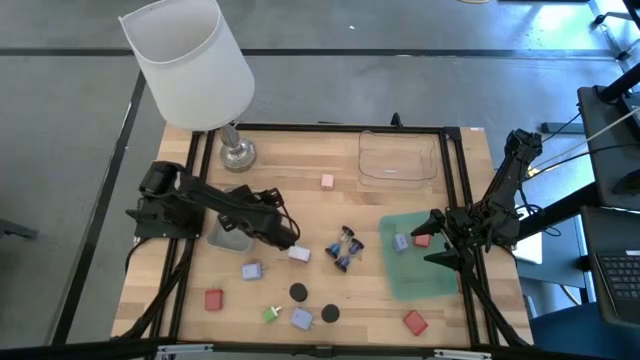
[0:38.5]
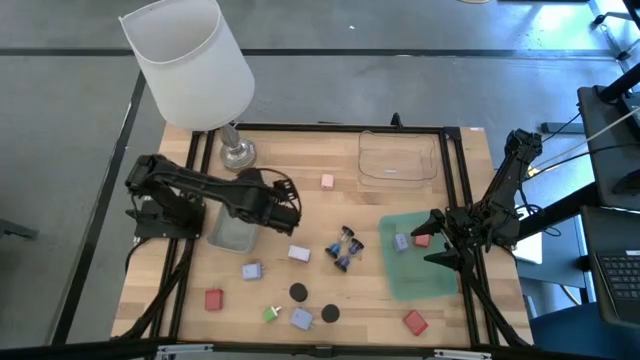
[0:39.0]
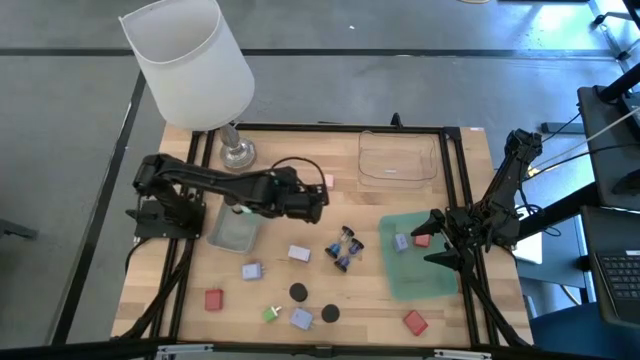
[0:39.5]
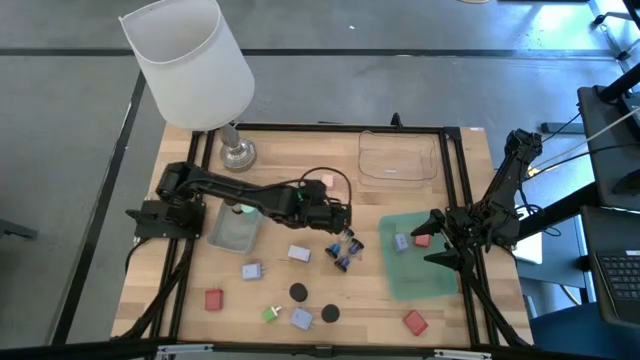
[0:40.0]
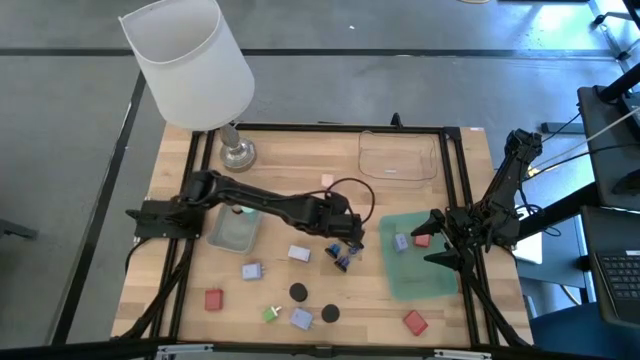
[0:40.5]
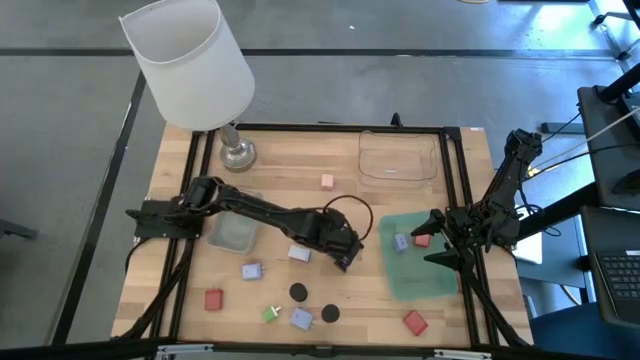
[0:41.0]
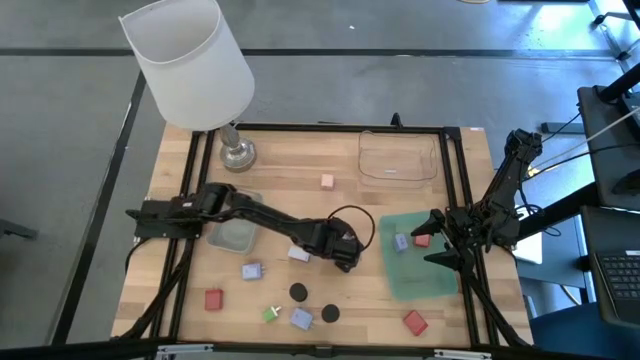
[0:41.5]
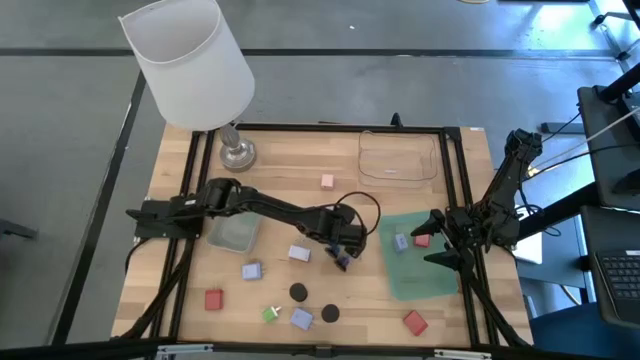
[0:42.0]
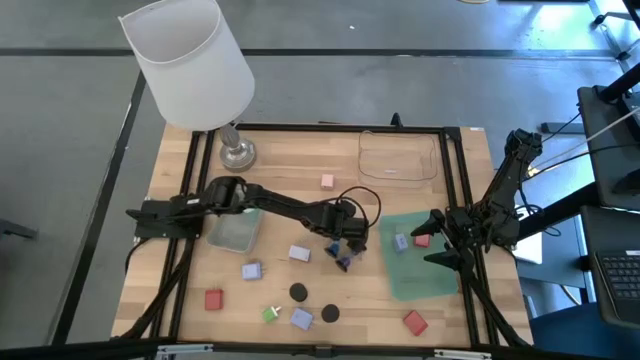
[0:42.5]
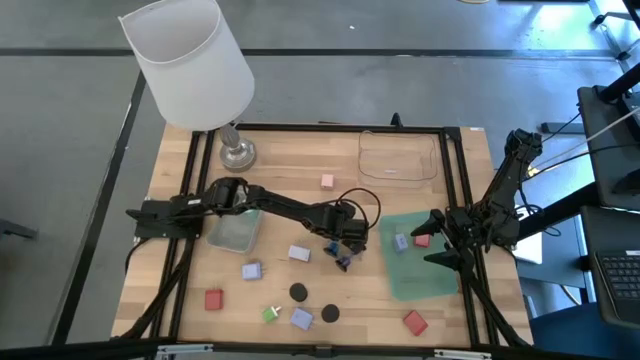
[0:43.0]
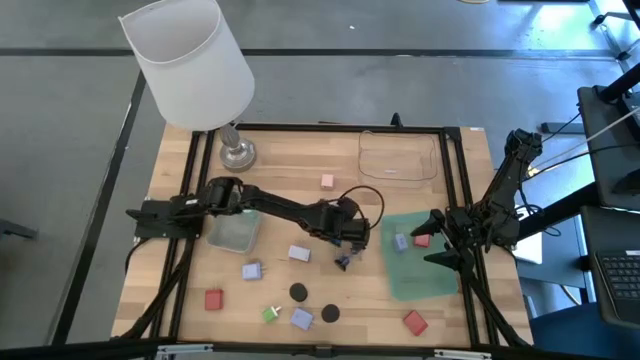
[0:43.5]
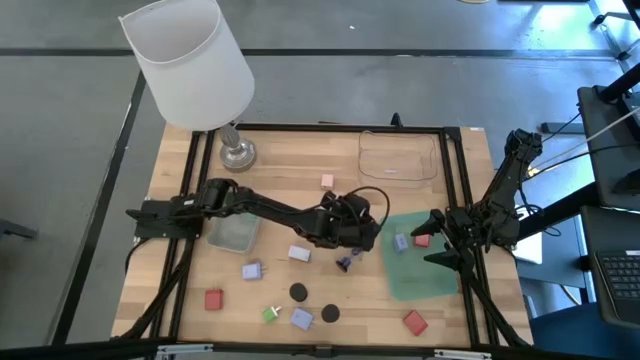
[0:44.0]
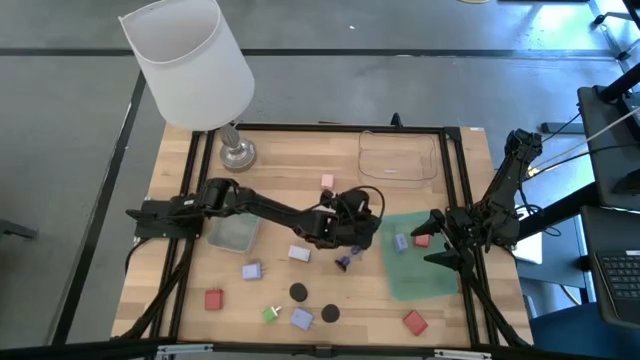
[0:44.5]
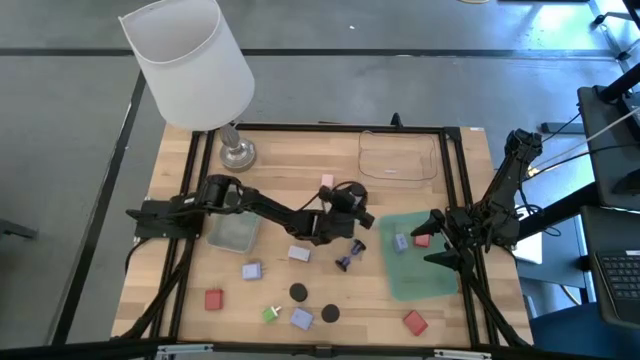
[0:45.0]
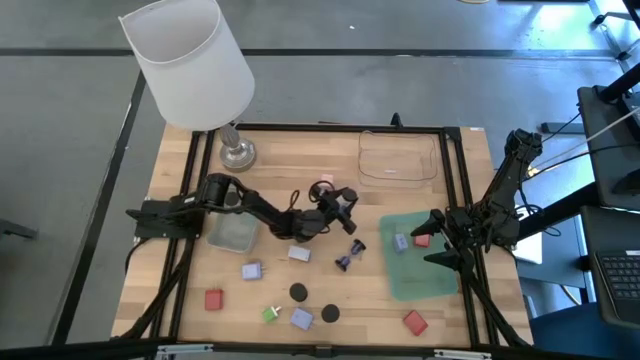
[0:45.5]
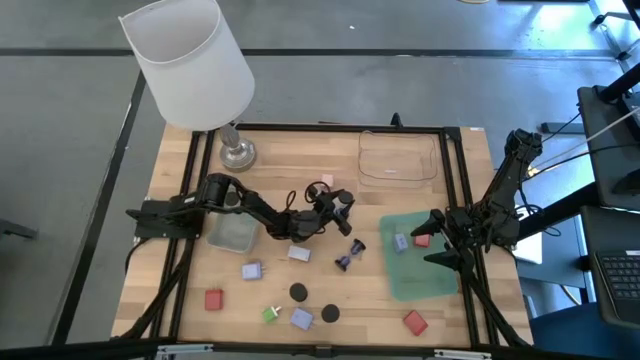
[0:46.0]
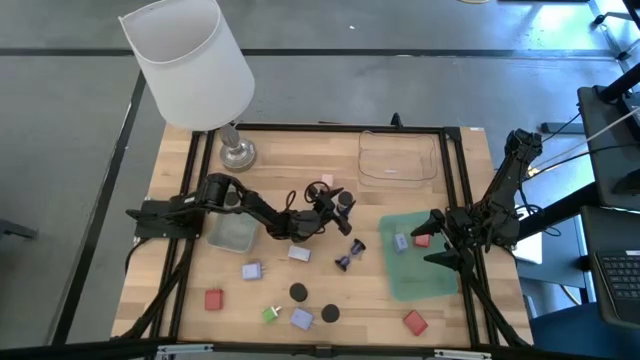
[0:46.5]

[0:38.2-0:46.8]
Task: Pick & Place Office items
Adjust the top blue hourglass

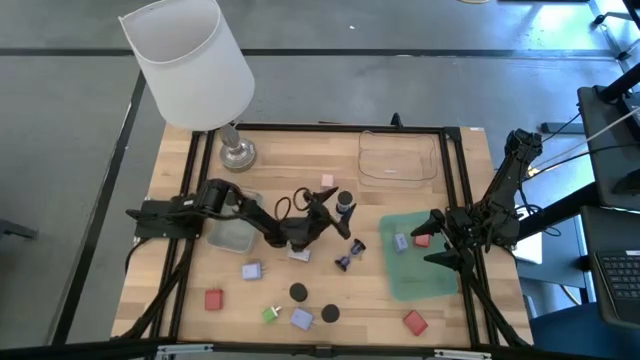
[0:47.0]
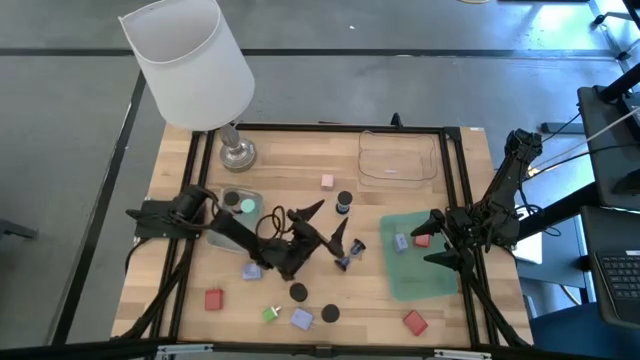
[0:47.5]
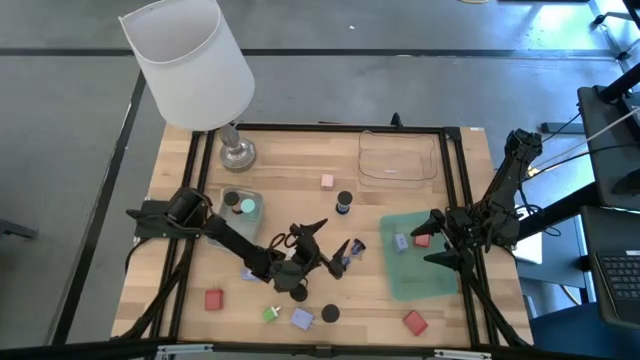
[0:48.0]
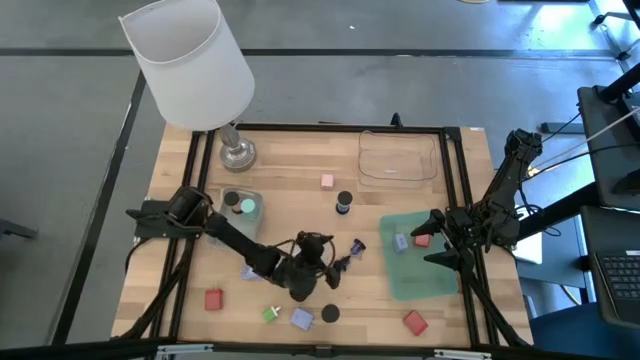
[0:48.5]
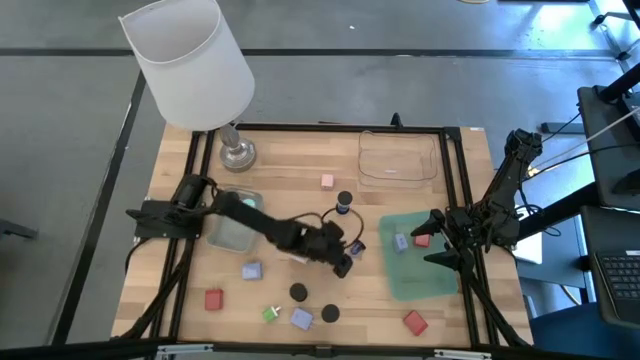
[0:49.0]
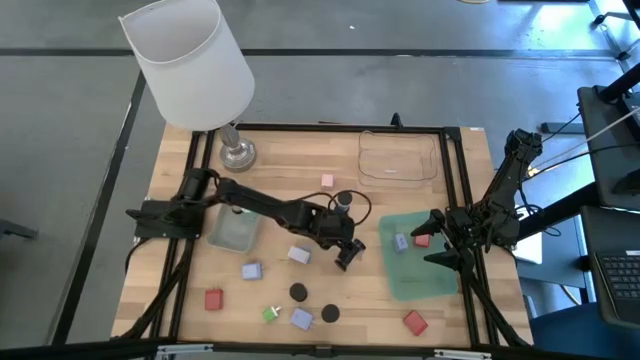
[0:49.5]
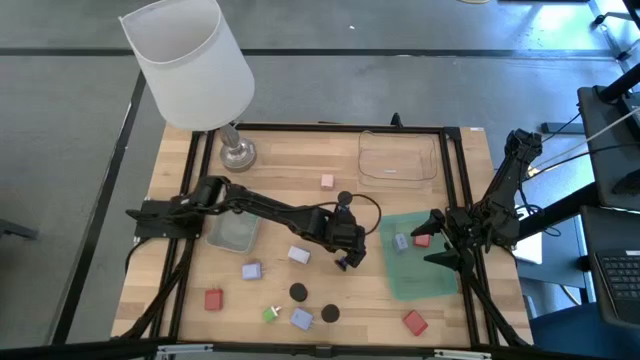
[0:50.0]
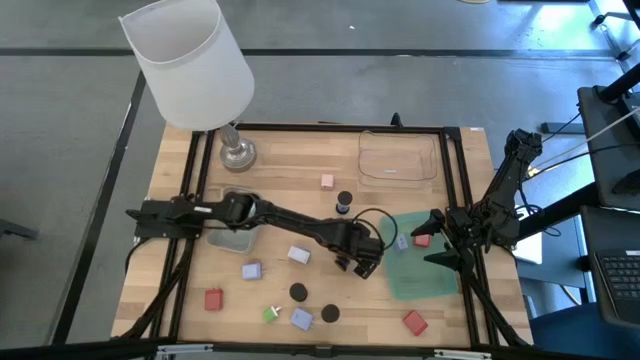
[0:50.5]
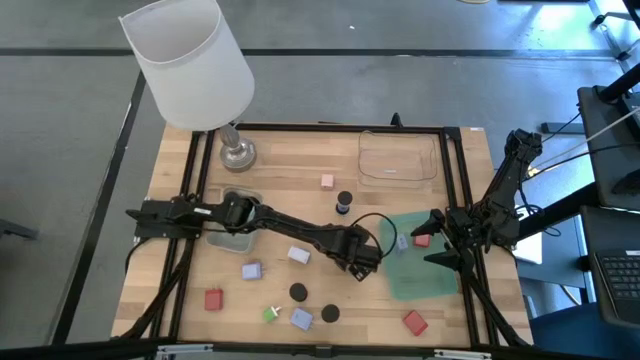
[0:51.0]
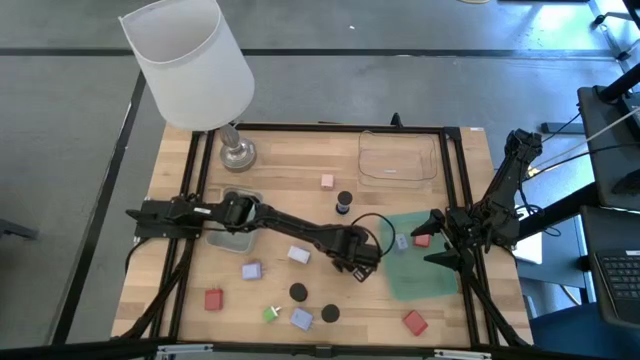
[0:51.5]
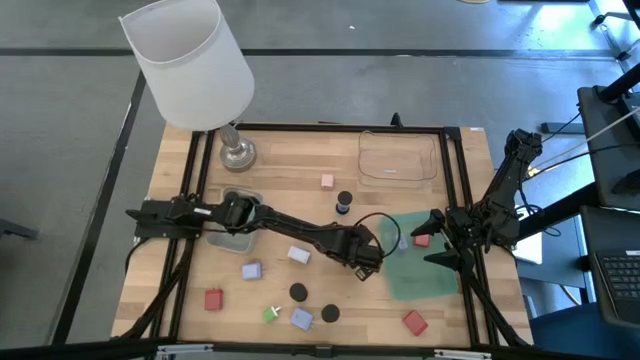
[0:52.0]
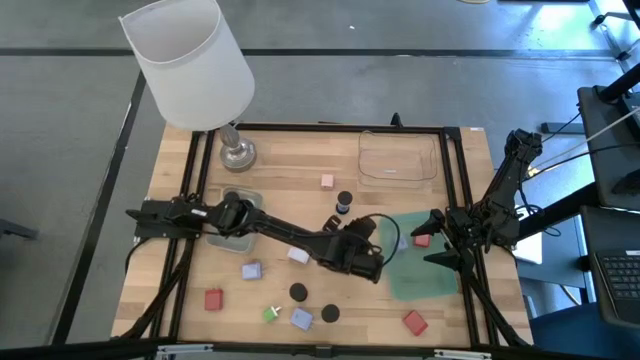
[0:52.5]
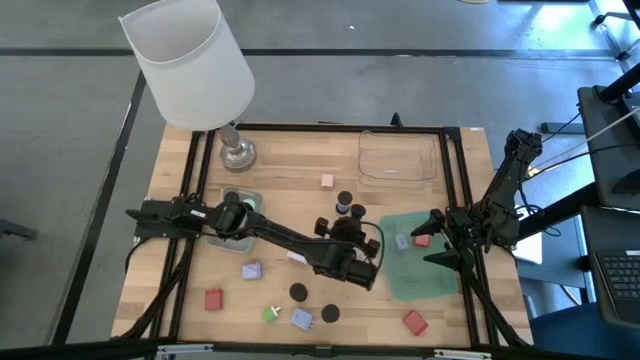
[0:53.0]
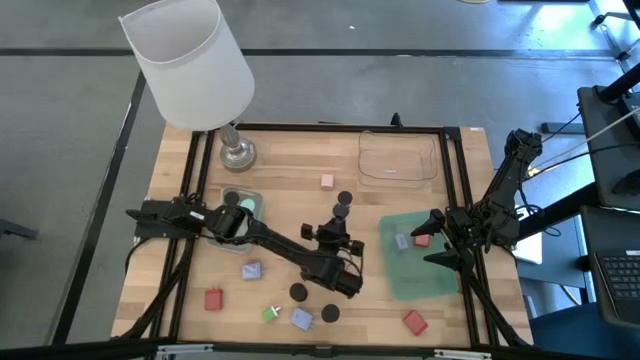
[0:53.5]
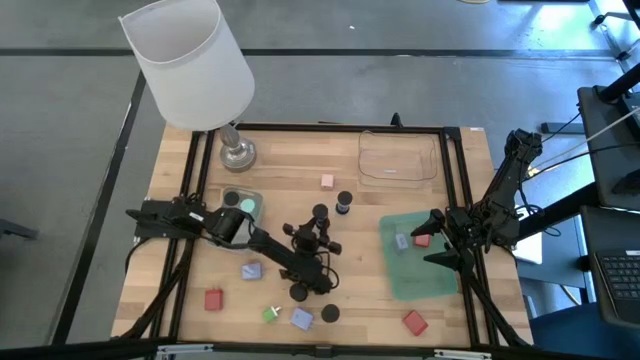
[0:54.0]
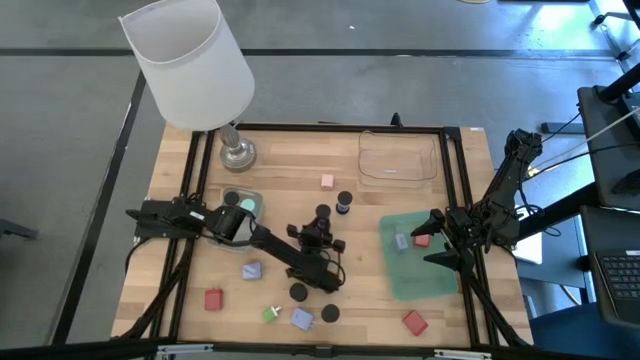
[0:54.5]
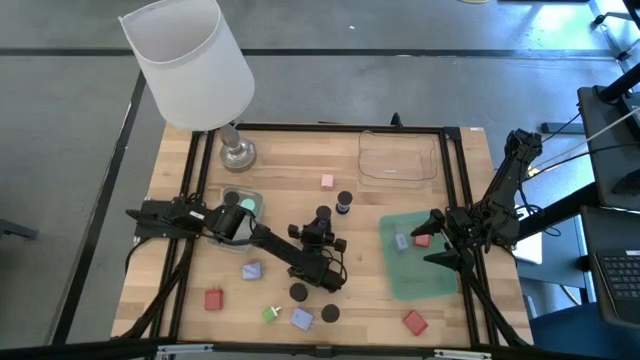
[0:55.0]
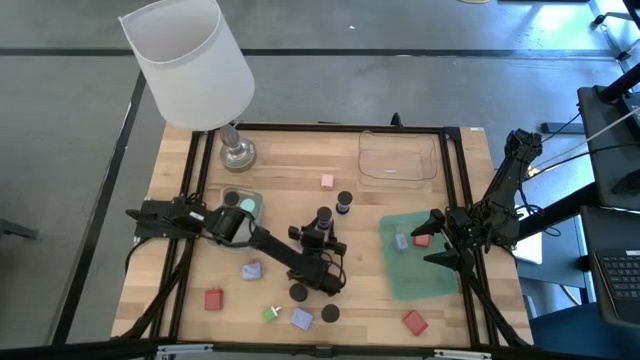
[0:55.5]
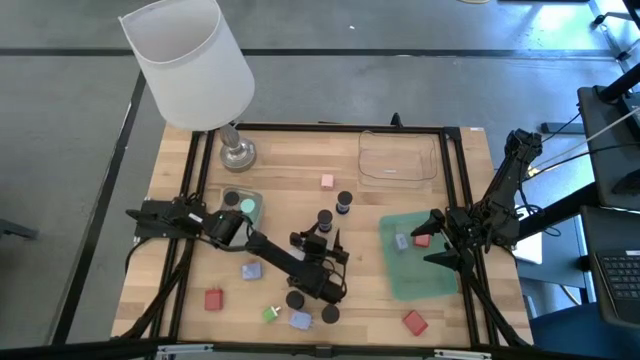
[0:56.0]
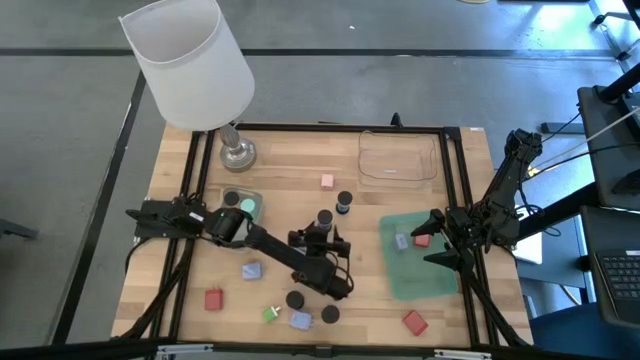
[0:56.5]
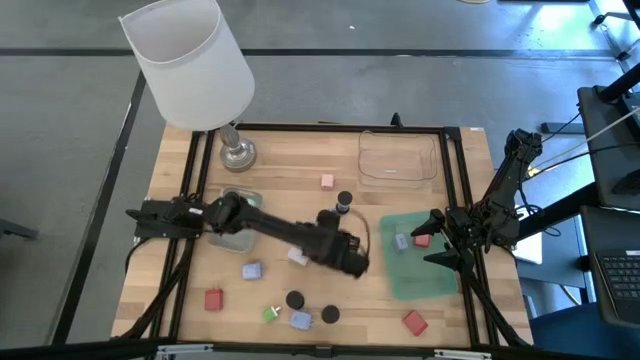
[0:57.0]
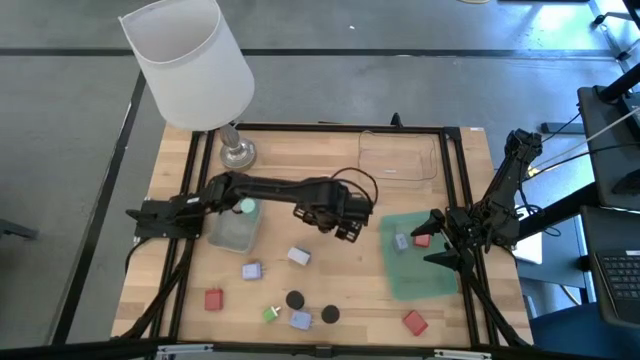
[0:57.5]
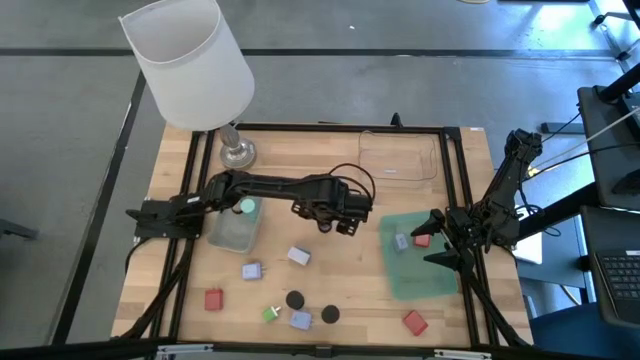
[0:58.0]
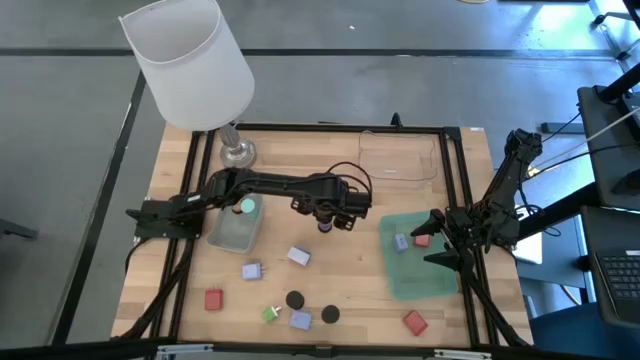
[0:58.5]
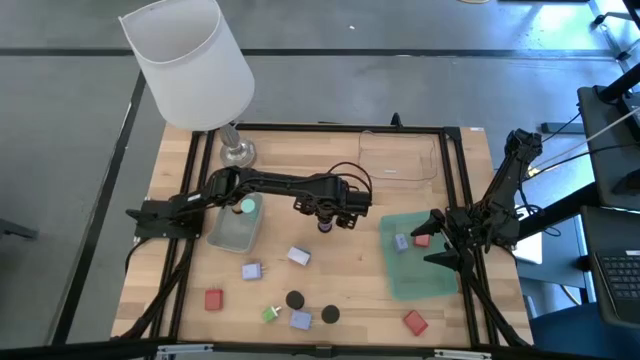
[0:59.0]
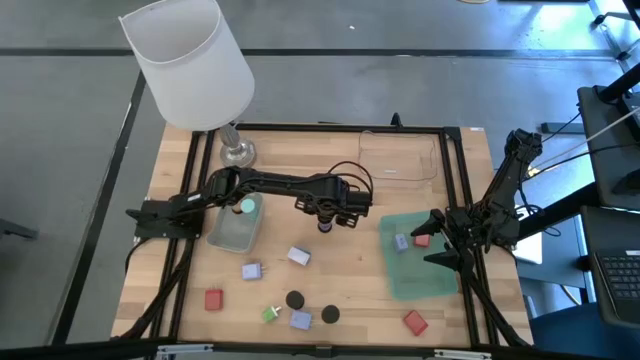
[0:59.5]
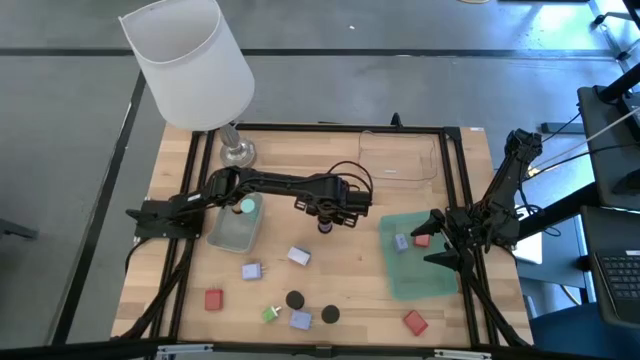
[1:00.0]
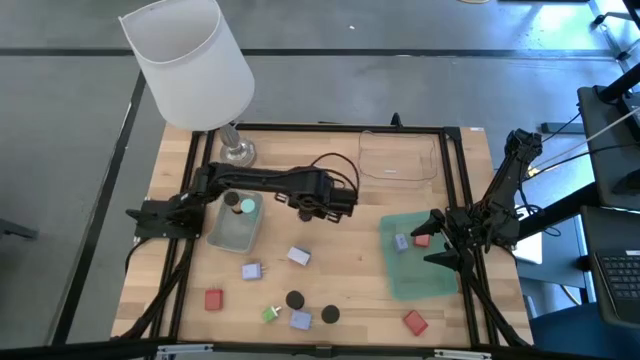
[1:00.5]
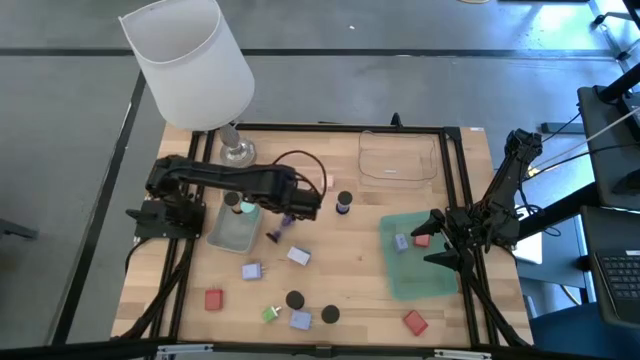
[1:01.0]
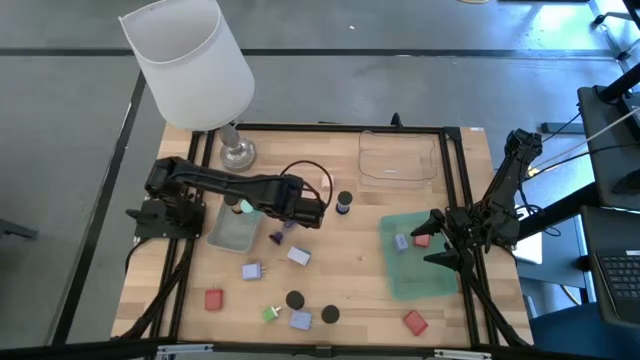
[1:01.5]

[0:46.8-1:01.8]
Put the the bottom blue hourglass into the gray bin
